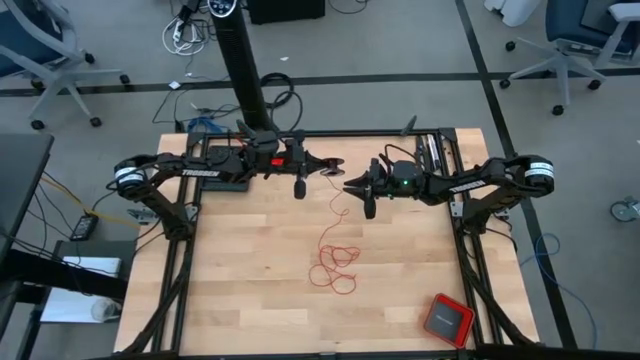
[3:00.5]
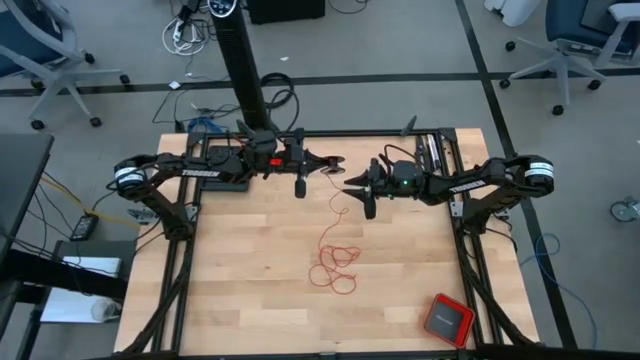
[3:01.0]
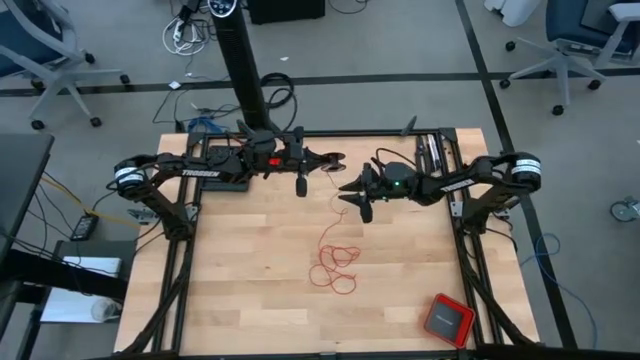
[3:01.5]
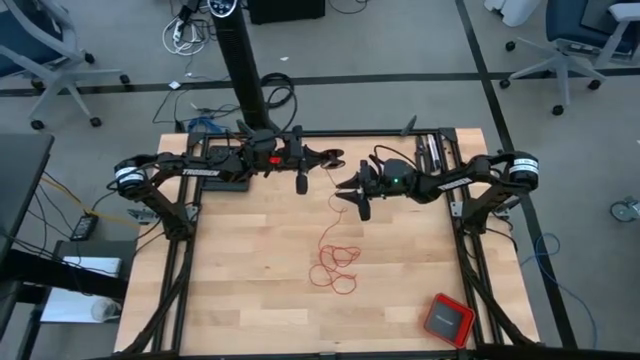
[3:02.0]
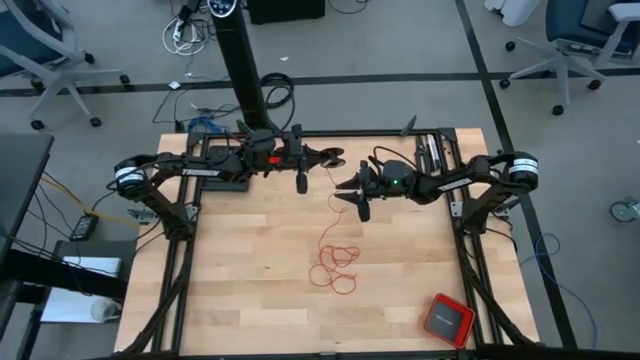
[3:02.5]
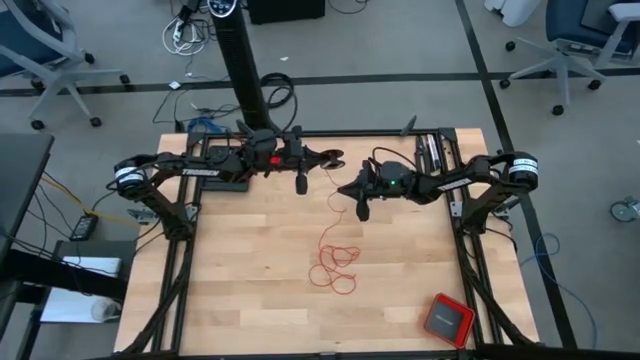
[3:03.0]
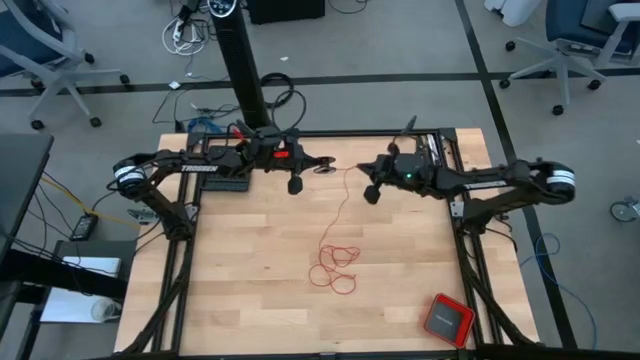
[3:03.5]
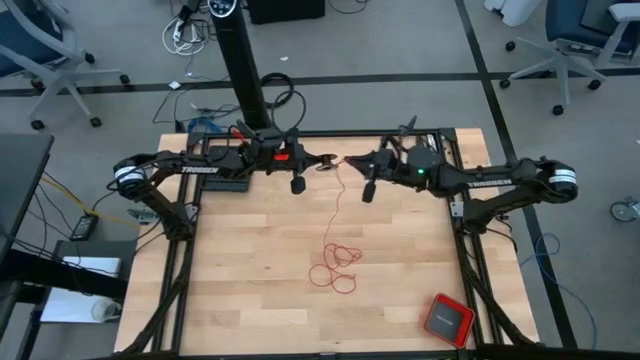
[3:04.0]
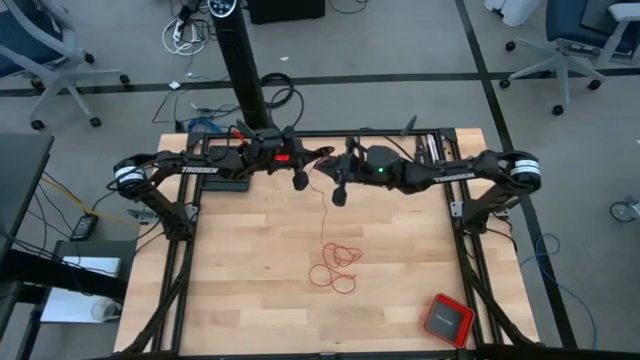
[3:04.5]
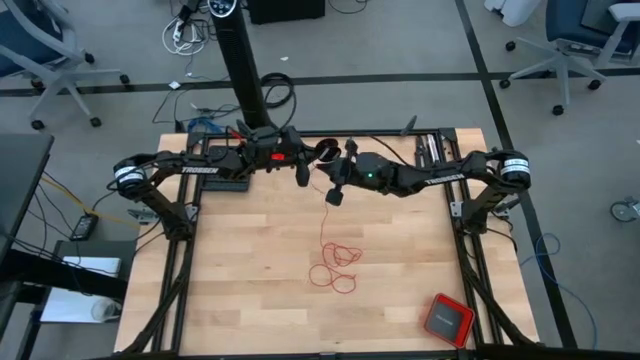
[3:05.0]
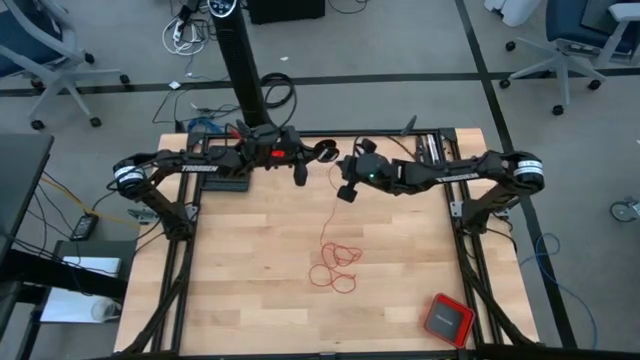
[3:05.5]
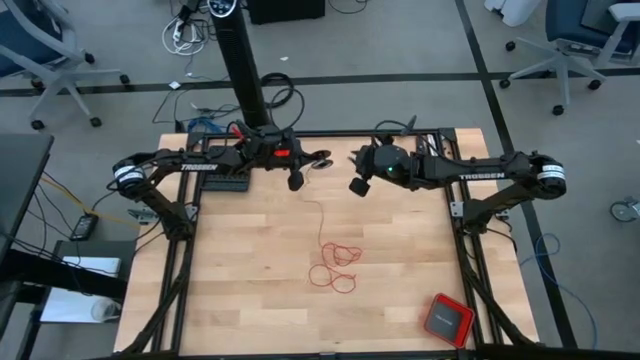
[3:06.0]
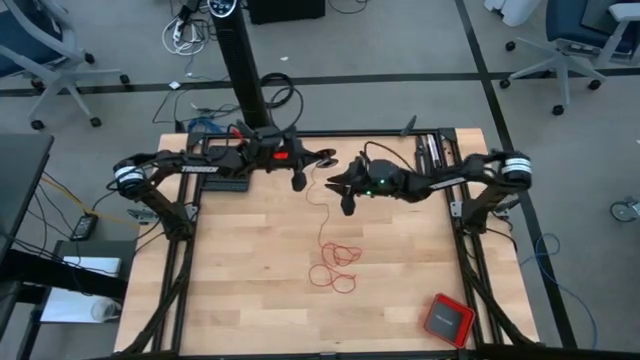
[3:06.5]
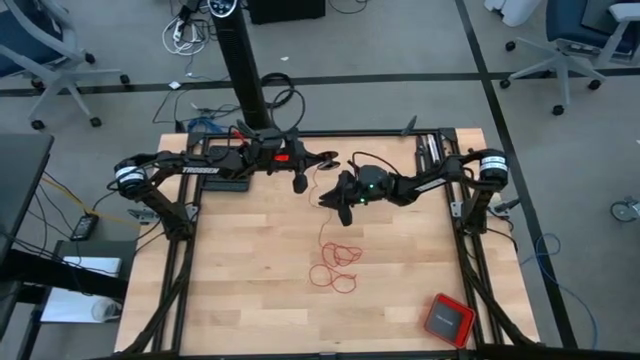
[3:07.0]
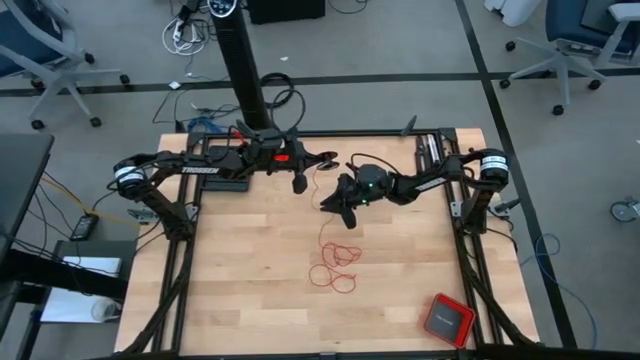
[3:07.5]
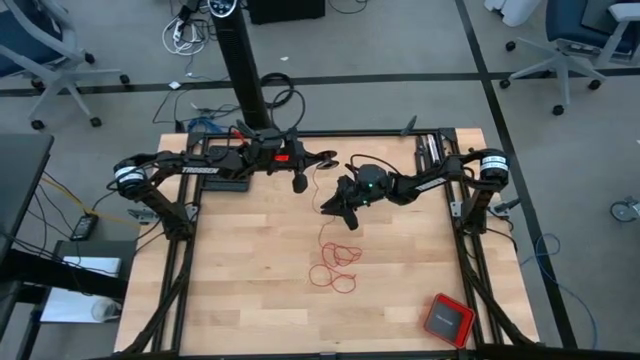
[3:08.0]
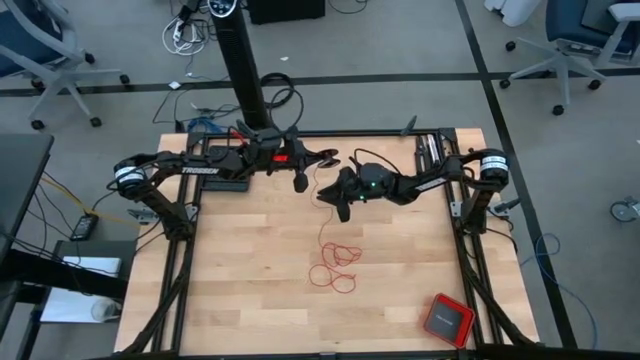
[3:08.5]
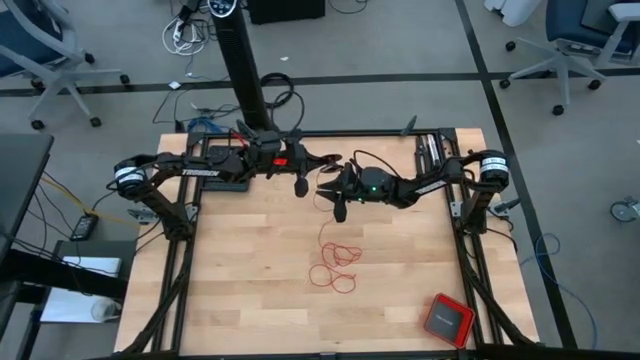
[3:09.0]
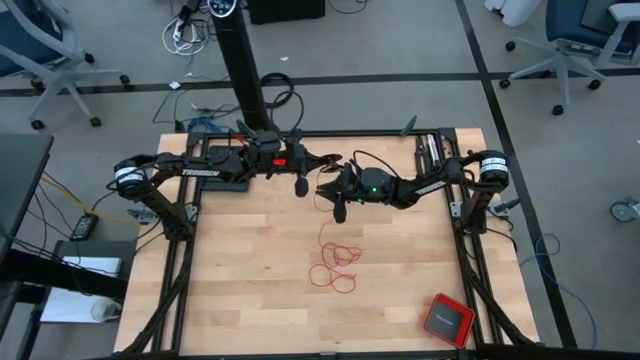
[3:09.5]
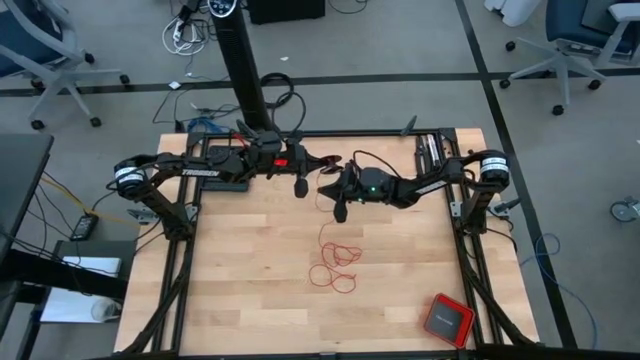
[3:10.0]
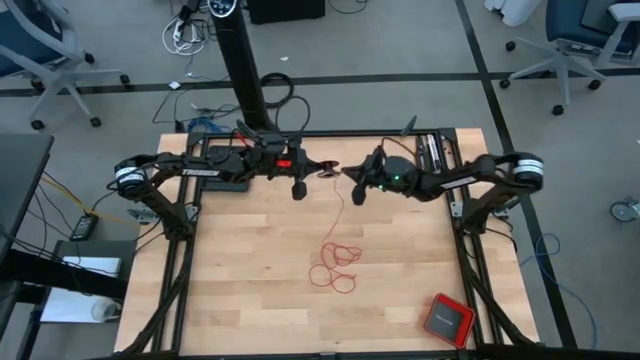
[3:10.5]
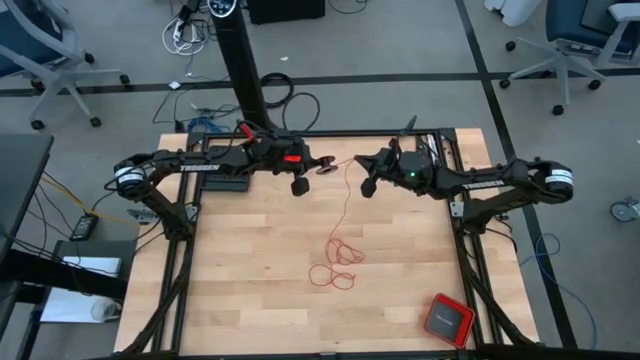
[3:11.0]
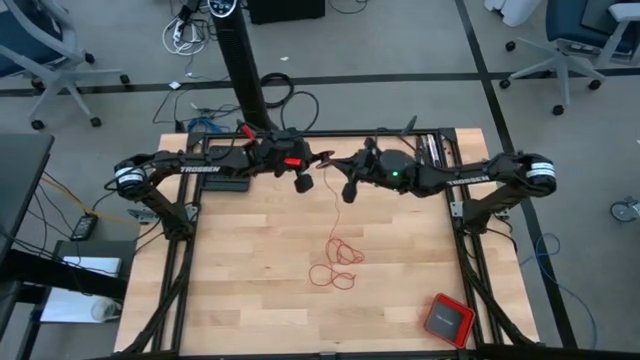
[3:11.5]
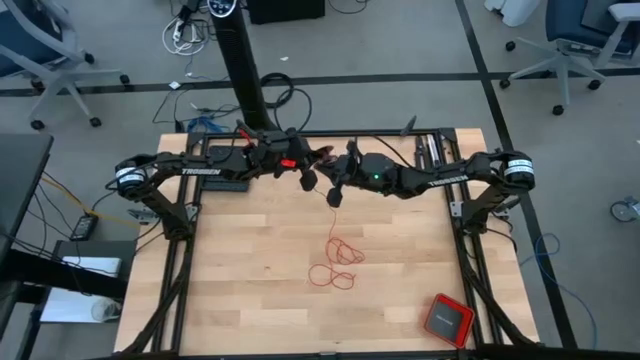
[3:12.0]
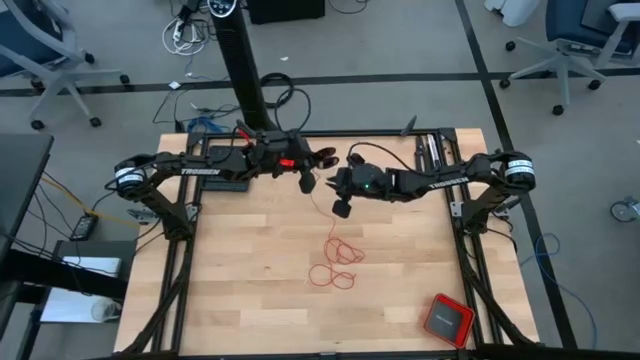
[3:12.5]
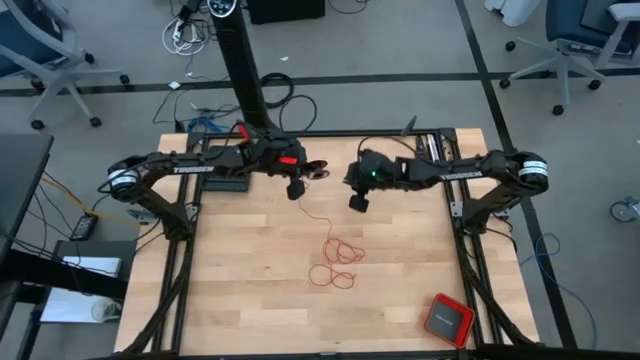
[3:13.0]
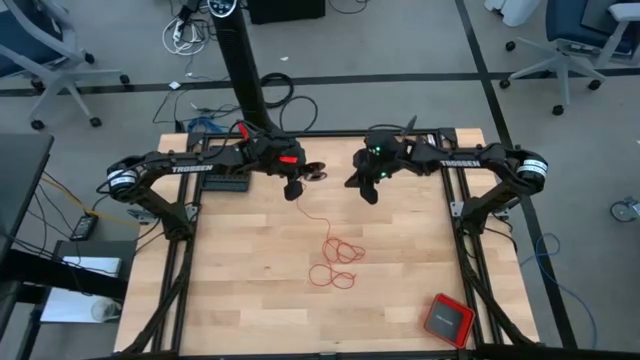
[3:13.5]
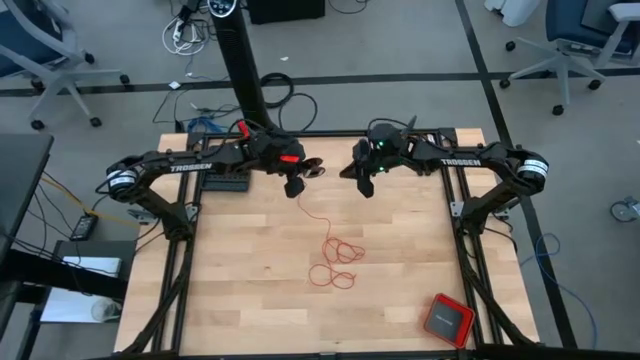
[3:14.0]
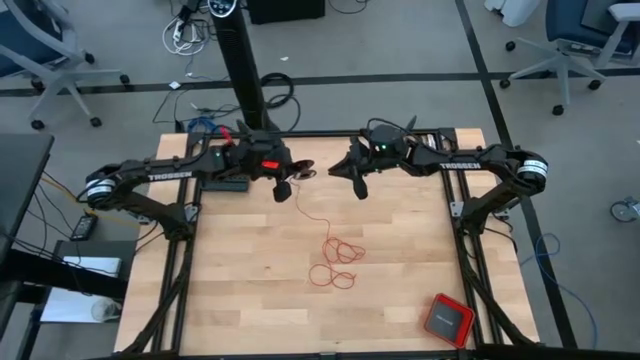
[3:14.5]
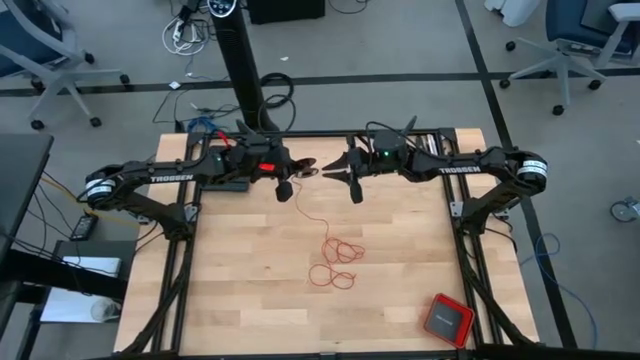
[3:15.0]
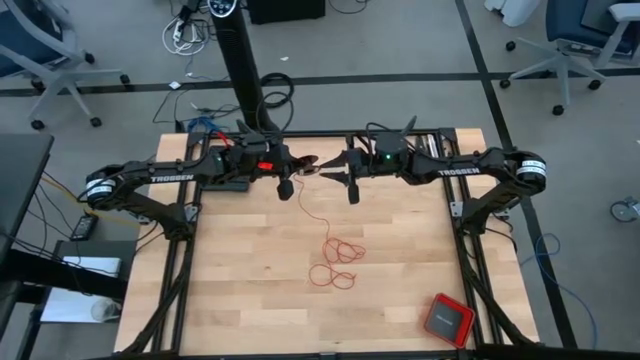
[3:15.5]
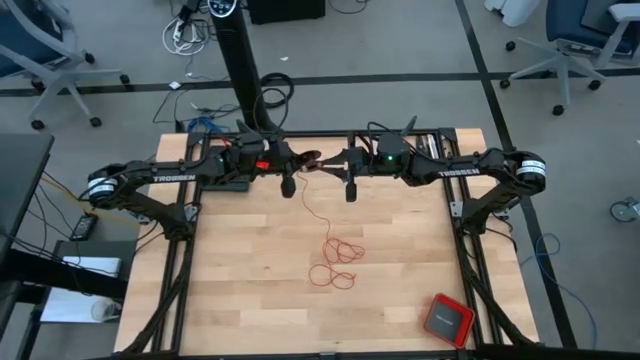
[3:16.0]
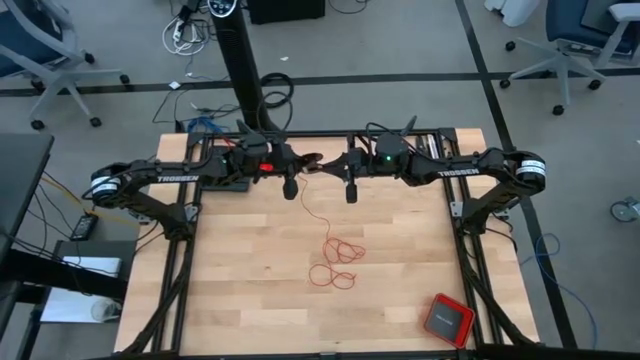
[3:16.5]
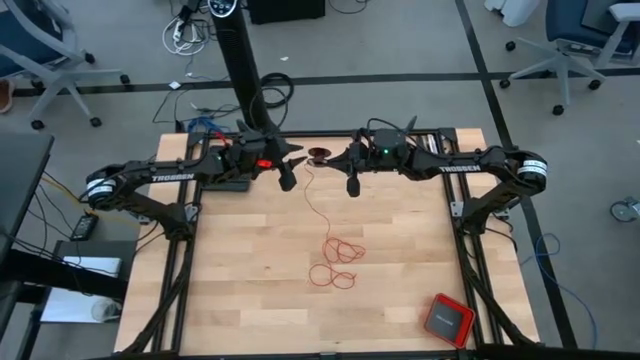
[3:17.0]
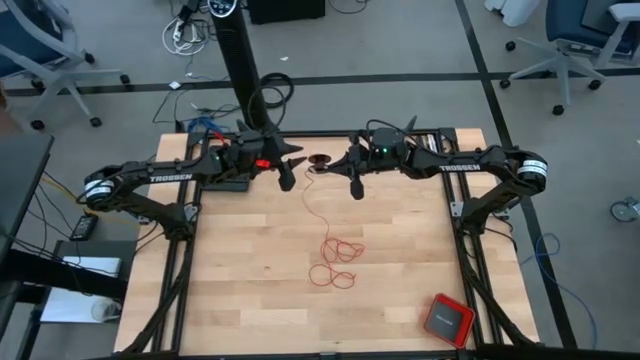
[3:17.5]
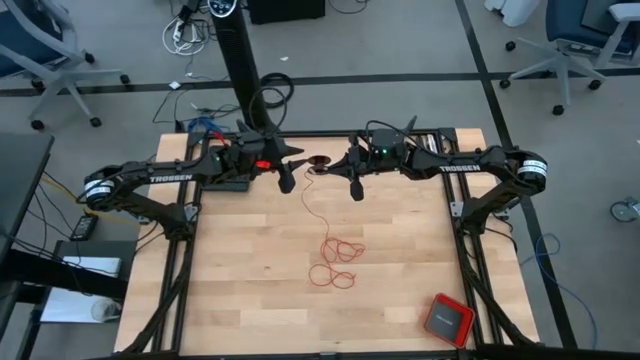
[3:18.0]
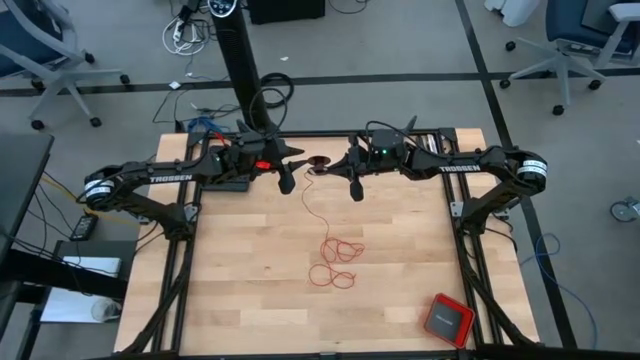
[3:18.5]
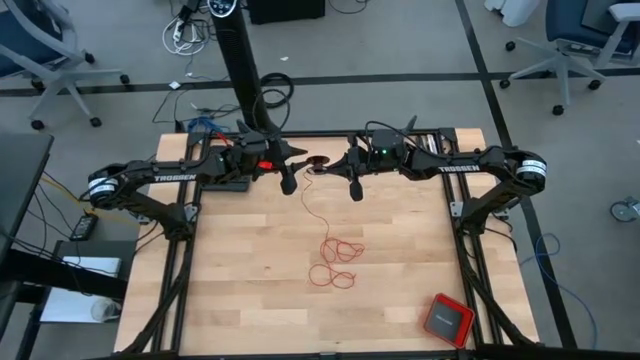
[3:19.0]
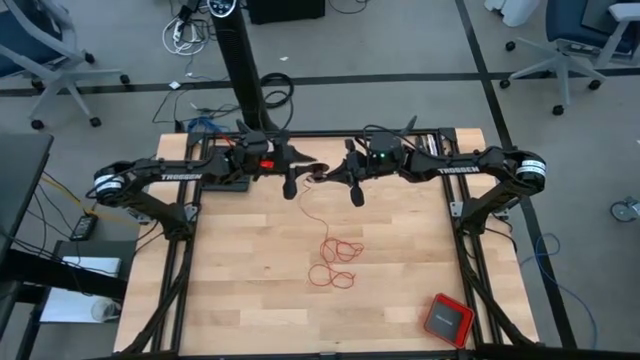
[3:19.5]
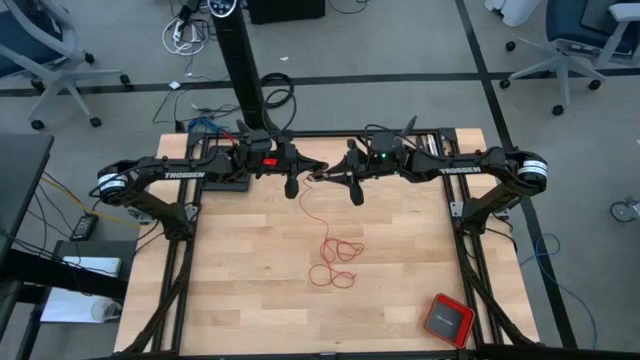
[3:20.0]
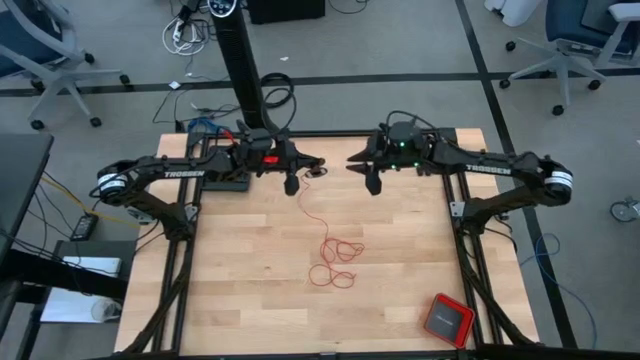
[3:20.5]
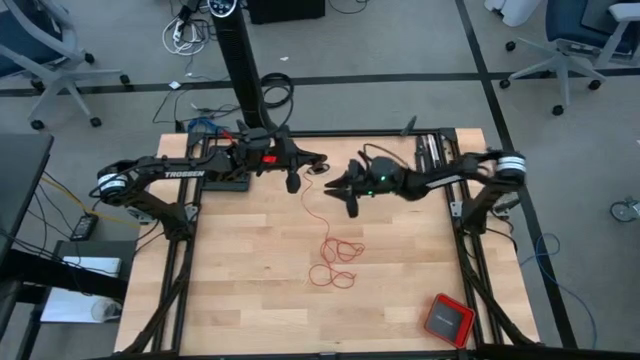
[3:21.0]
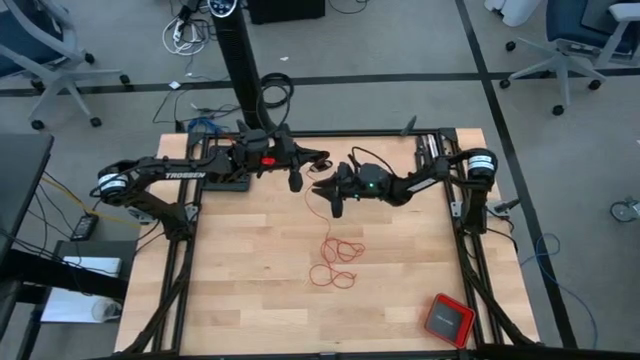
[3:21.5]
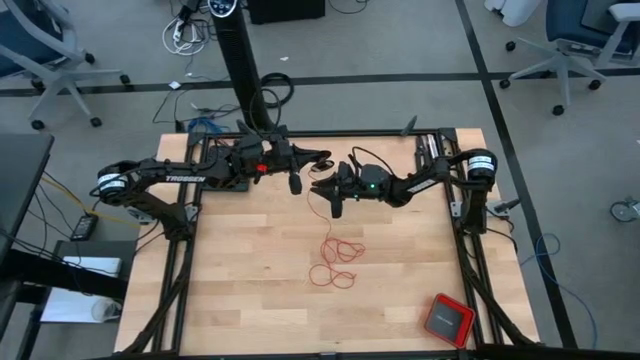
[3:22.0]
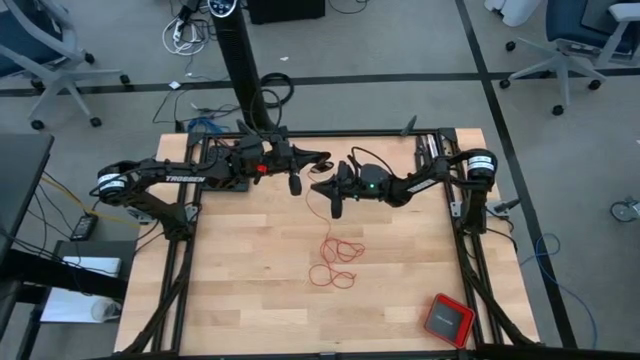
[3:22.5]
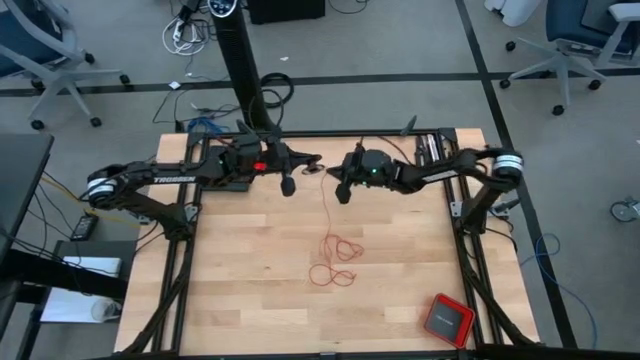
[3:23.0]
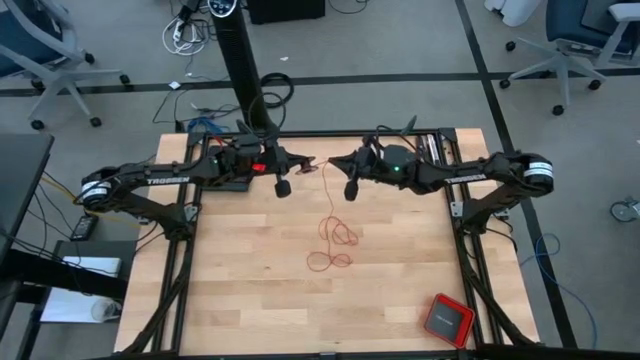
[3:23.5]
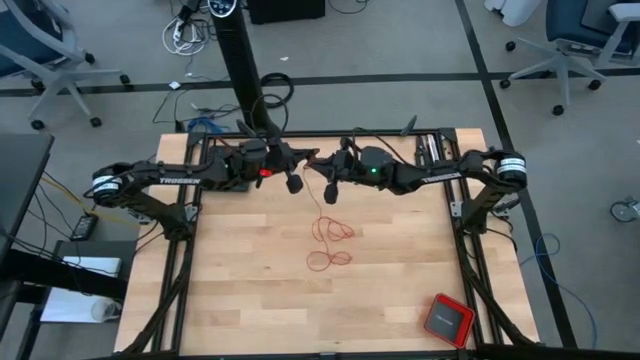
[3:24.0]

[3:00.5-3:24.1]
Task: Coil cords
Coil the red wire onto the spool
